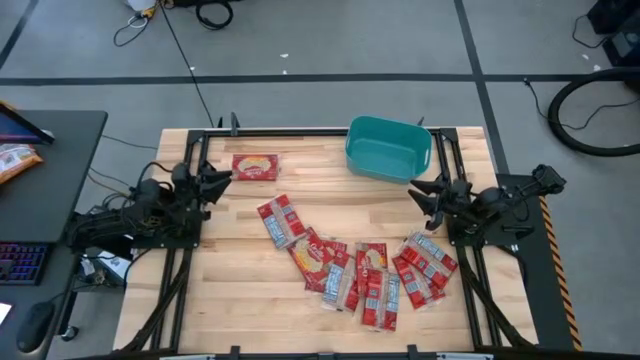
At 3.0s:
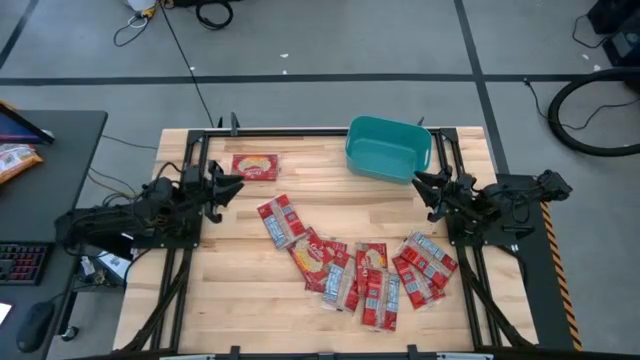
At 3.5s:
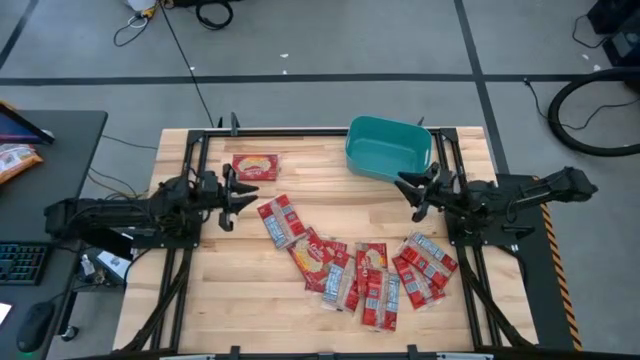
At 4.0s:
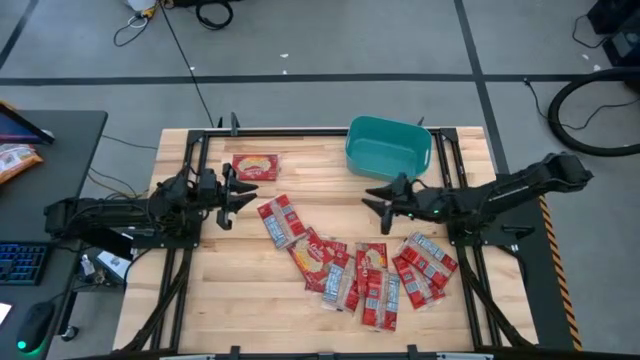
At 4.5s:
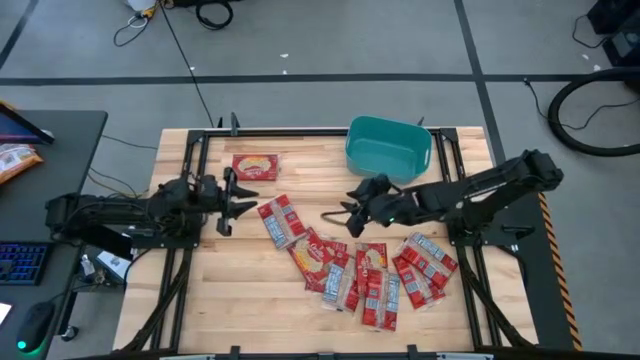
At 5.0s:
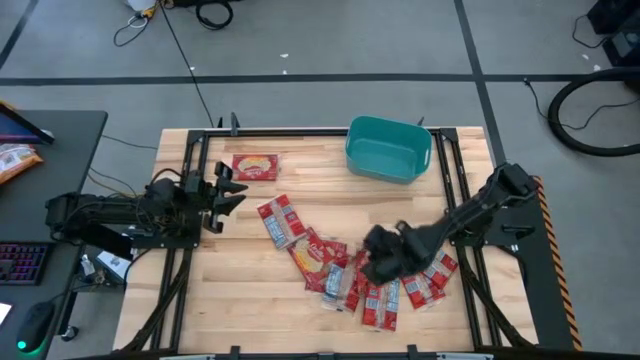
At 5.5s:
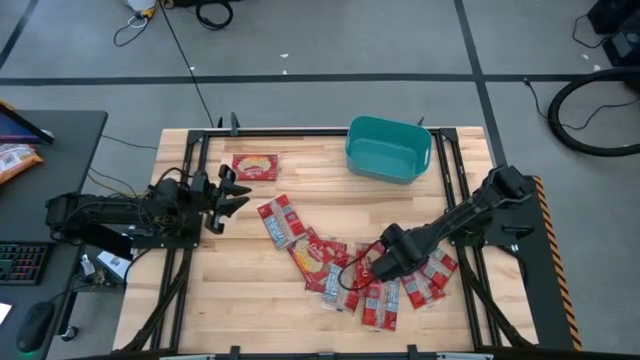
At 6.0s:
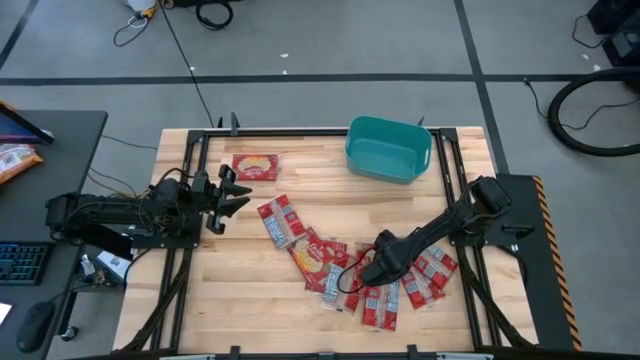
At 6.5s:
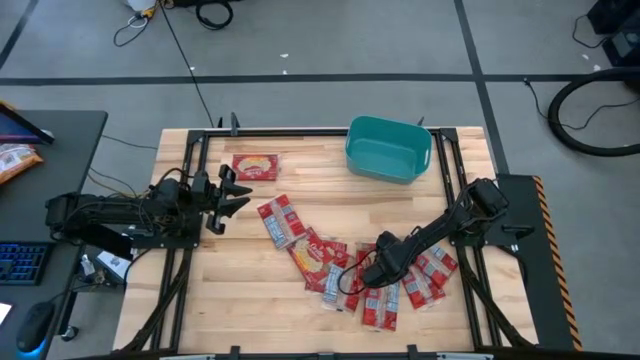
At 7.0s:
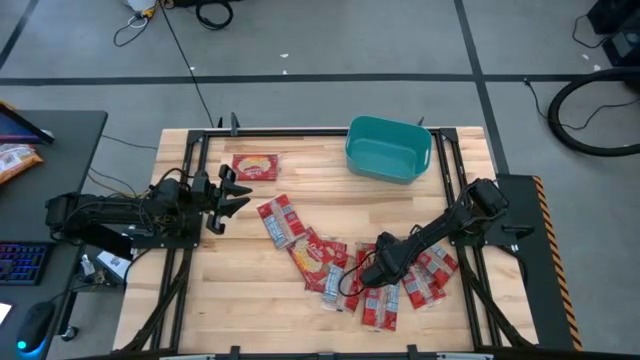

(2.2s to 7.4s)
Task: Sort popcorn bags into baskets
Put the red popcorn bag into the green bin

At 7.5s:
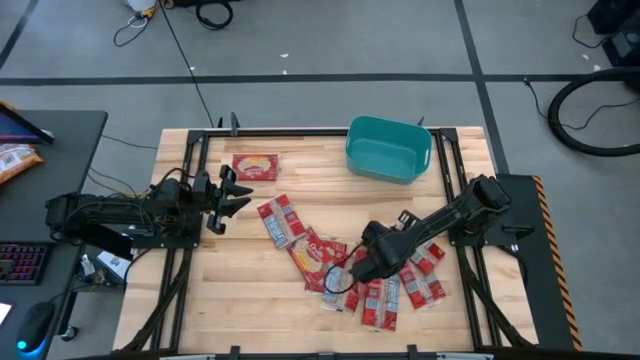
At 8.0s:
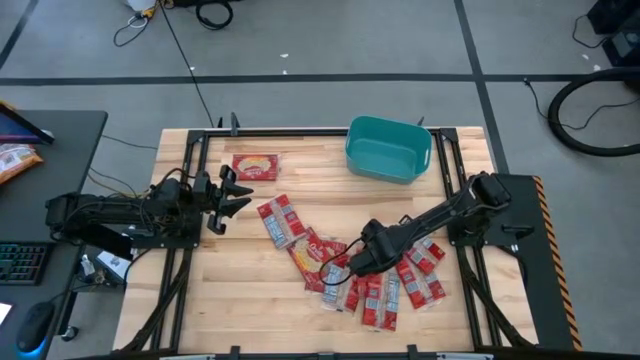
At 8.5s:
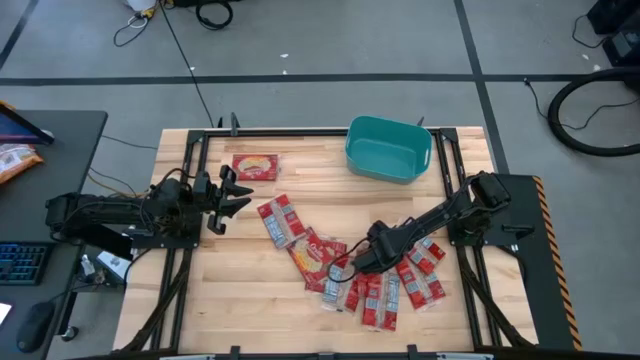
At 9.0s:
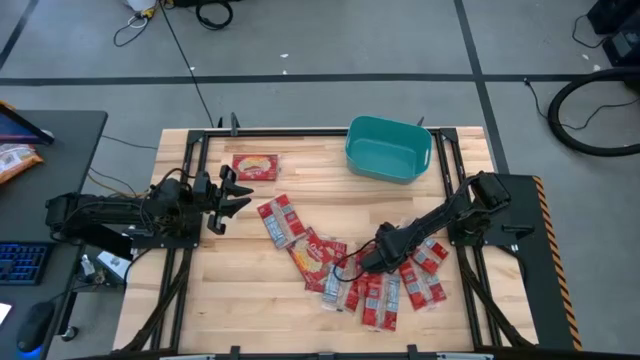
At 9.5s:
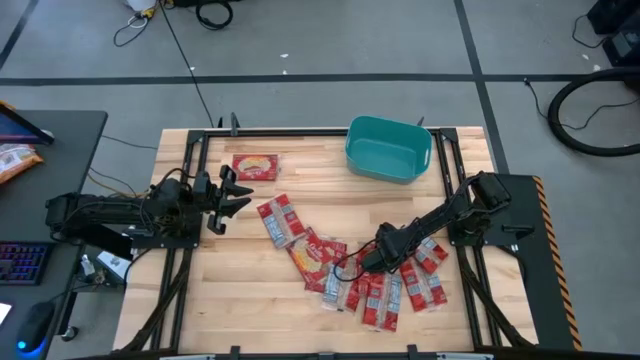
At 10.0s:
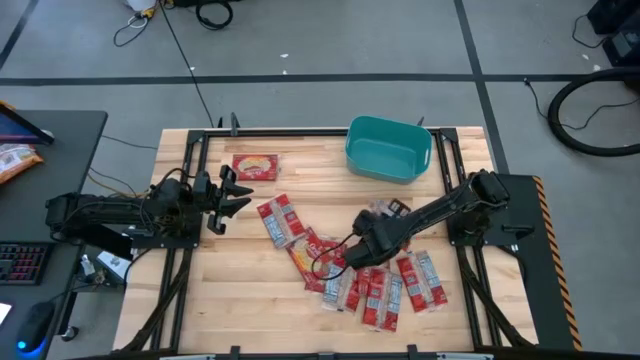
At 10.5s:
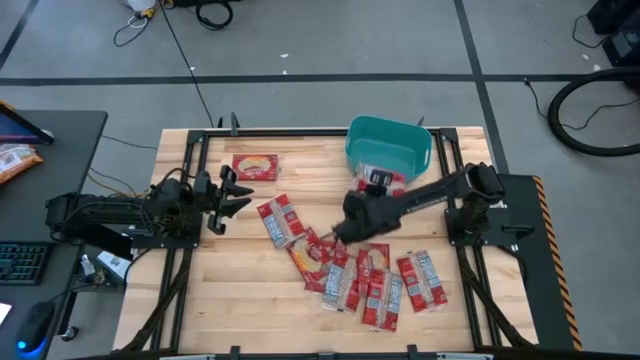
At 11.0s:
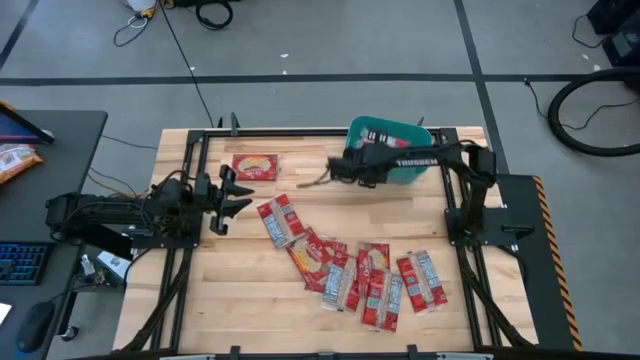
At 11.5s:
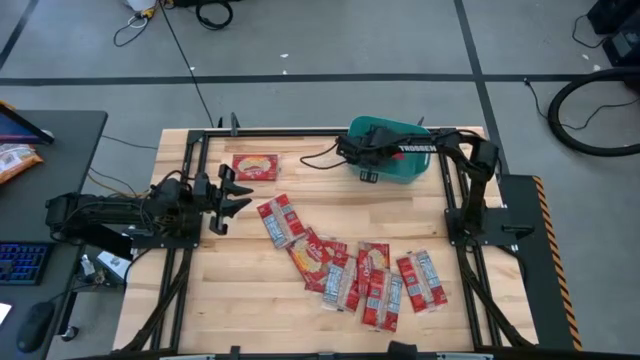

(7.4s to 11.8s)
Put the red popcorn bag into the green bin

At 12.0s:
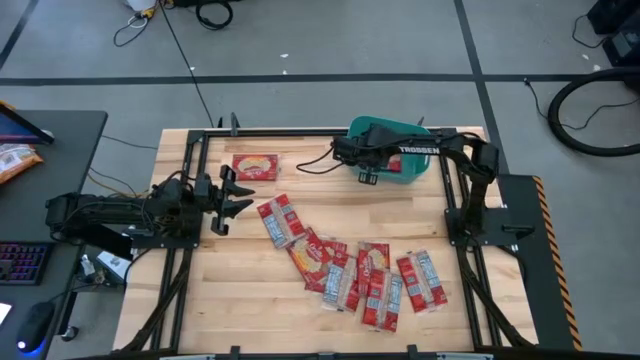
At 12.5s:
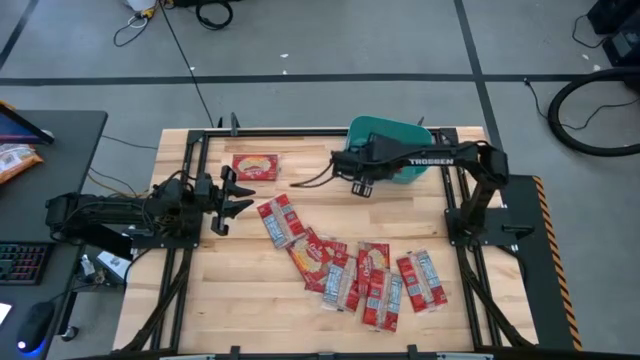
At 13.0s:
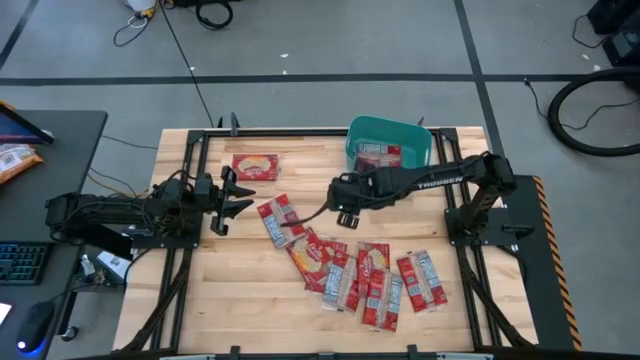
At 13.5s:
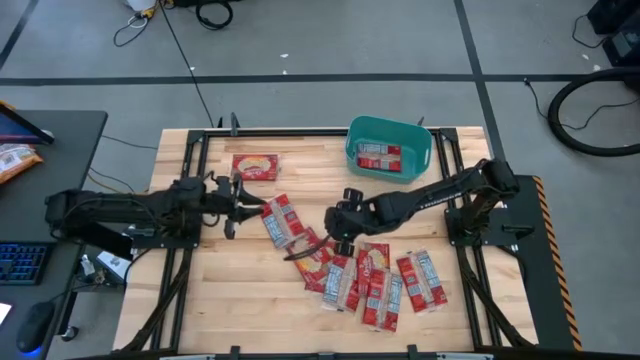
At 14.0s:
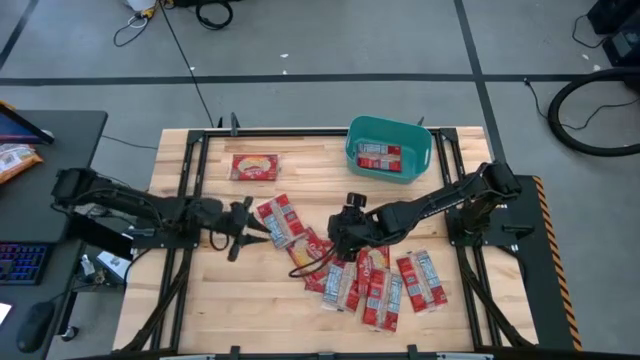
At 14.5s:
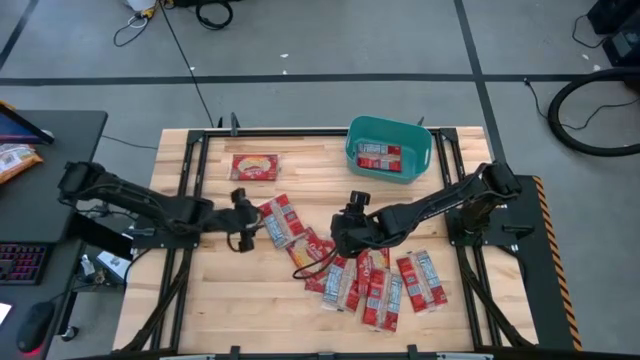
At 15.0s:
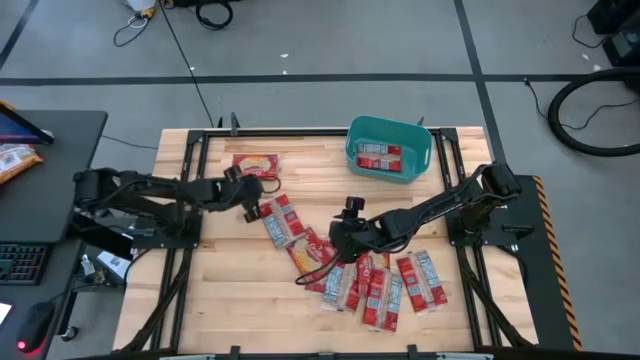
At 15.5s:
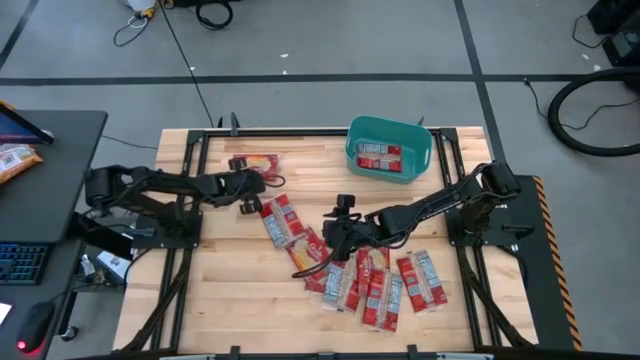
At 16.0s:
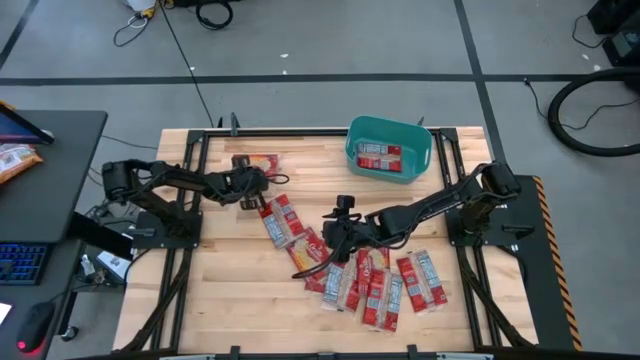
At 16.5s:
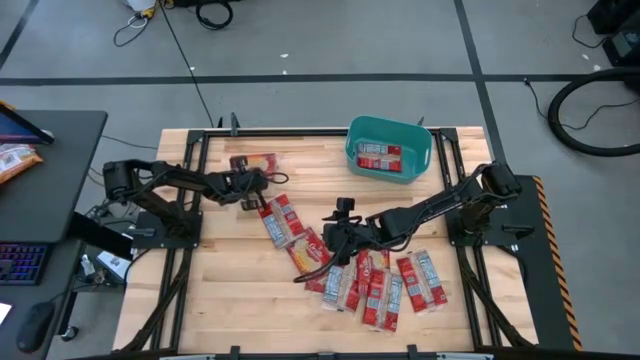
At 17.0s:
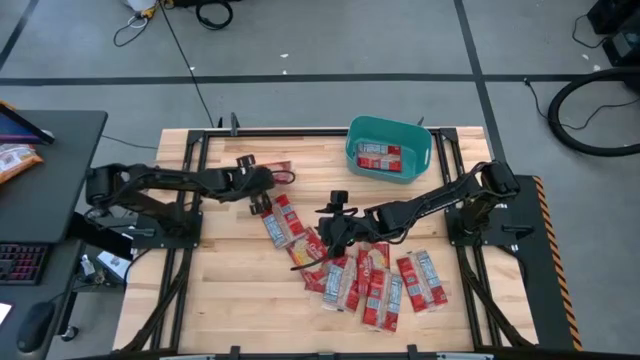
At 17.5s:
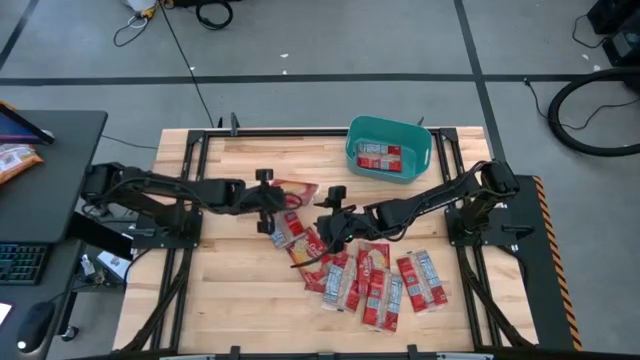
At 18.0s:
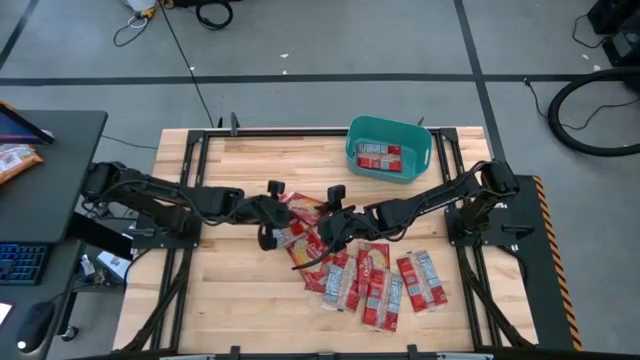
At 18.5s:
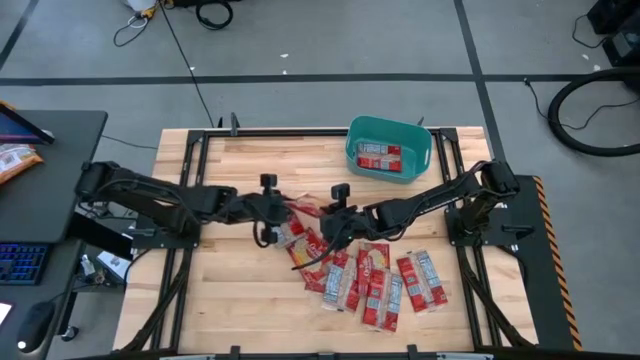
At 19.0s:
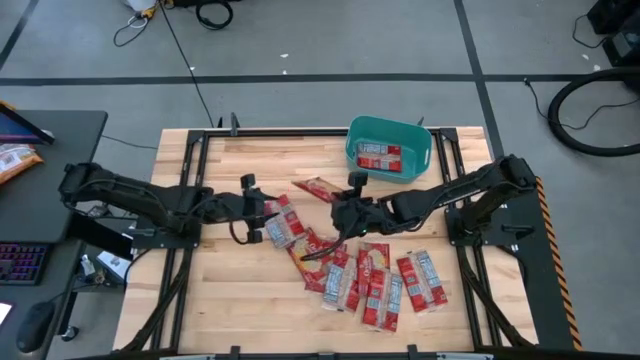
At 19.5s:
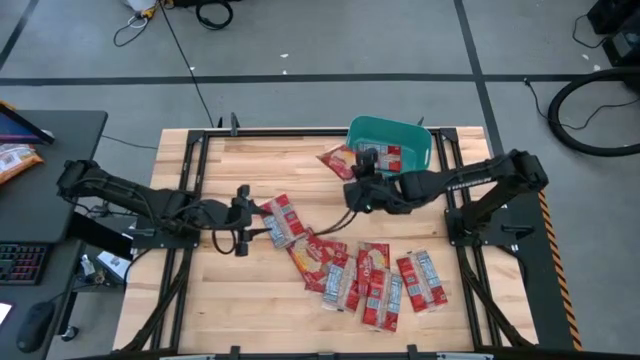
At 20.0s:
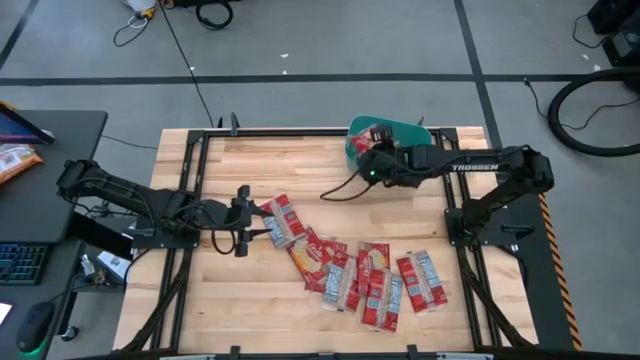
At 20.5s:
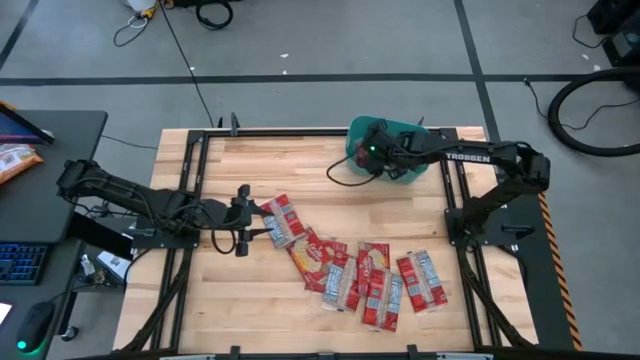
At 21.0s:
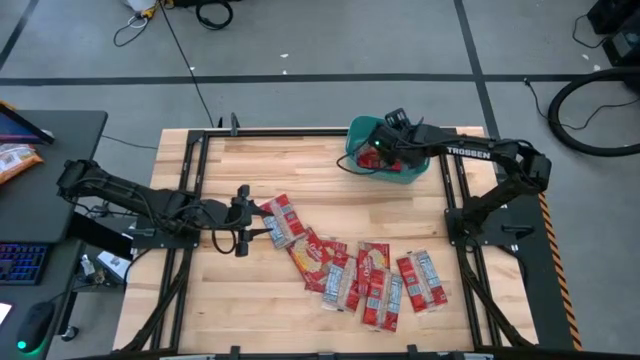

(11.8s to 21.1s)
Put the red popcorn bag into the green bin

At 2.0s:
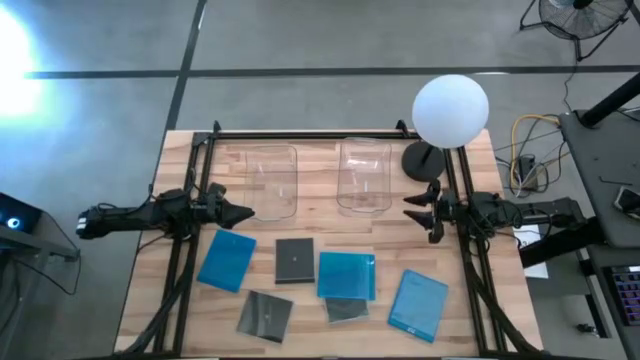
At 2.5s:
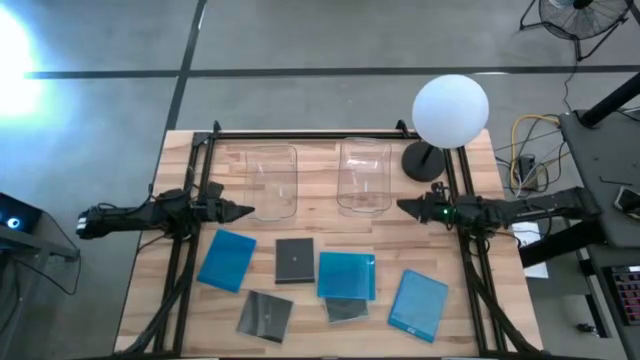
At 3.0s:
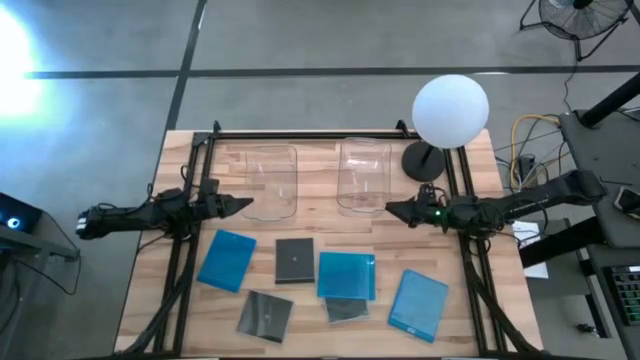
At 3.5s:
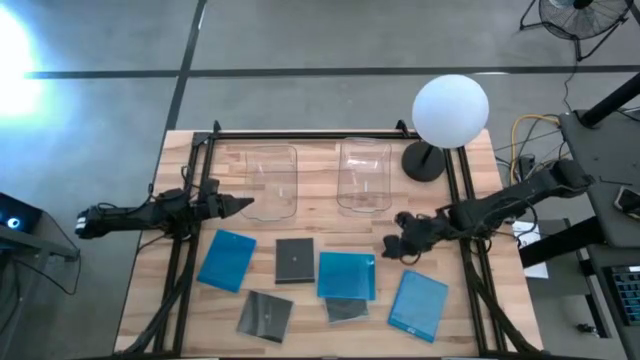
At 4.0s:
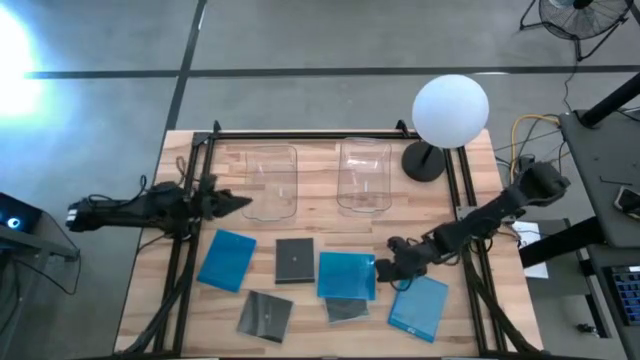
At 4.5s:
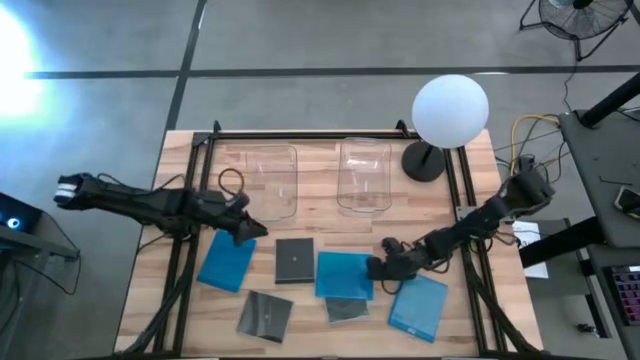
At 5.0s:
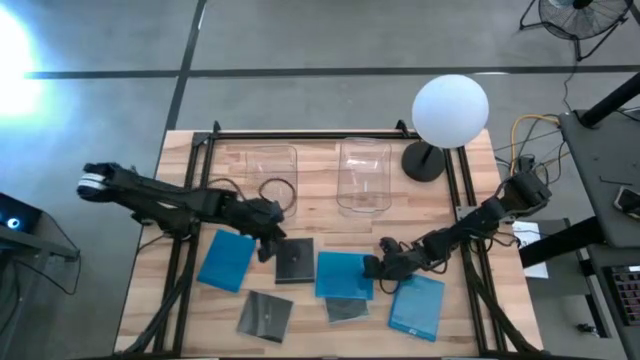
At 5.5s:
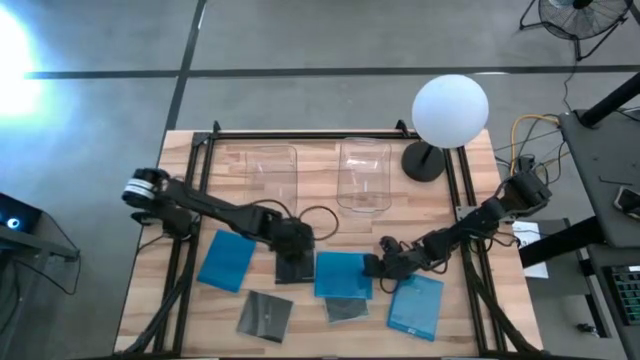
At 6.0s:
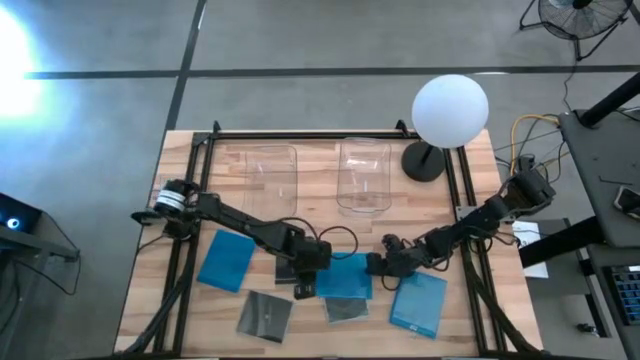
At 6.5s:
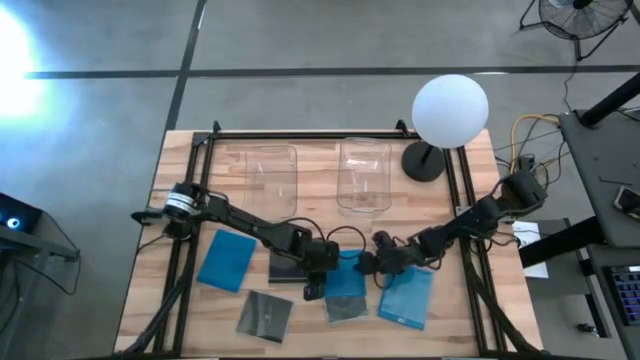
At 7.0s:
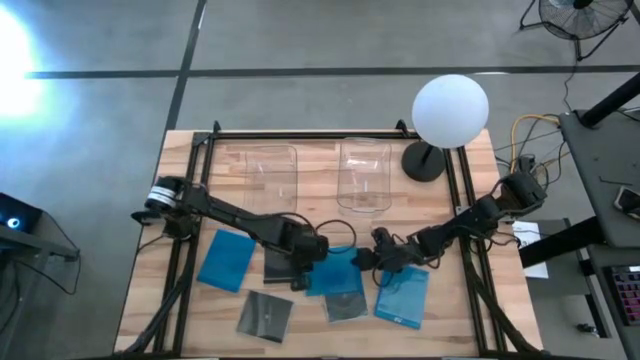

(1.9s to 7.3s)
Task: Pick & place jewel cases by type
Put the middle blue CD case into the right transparent bin
